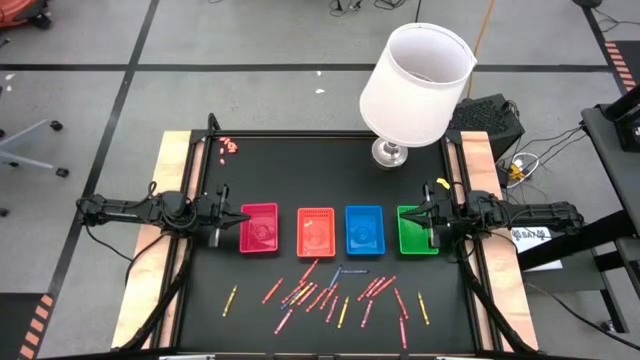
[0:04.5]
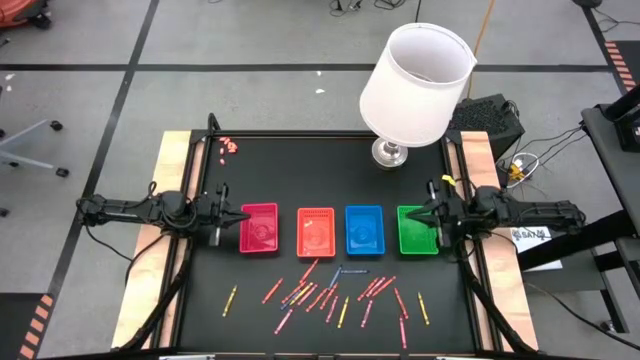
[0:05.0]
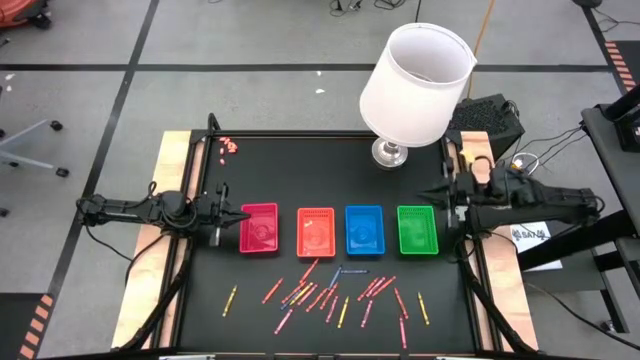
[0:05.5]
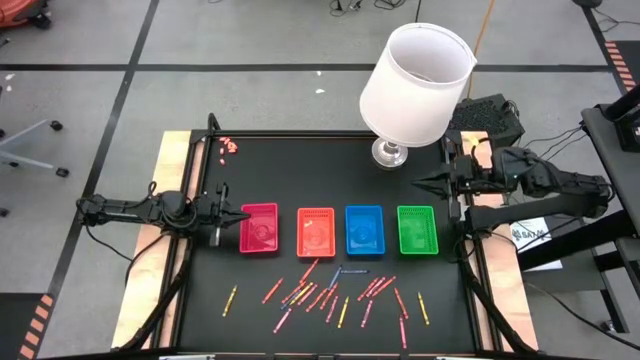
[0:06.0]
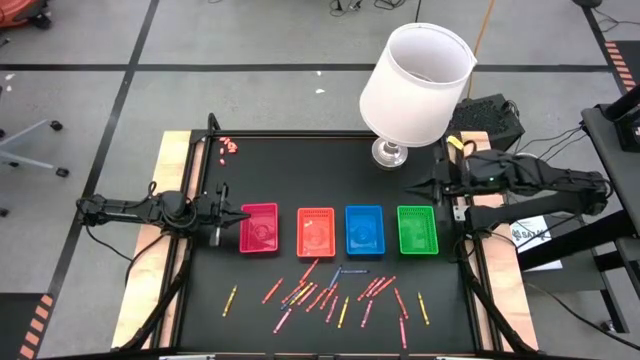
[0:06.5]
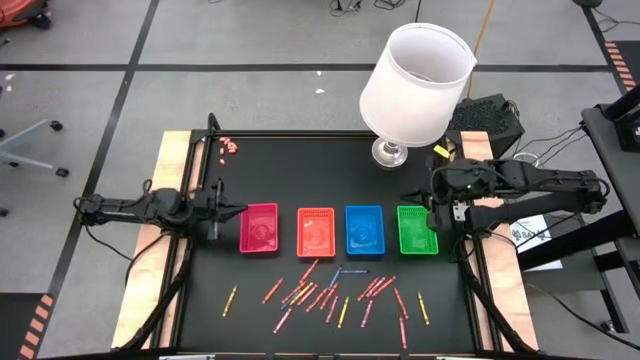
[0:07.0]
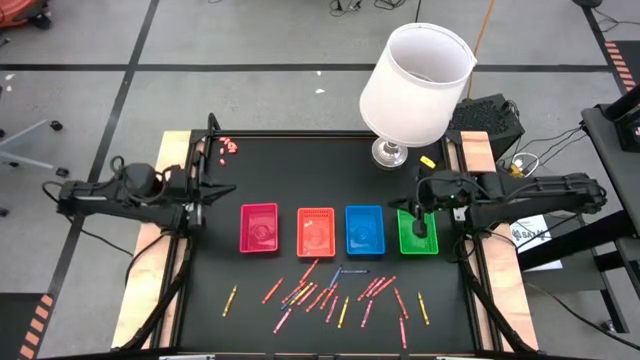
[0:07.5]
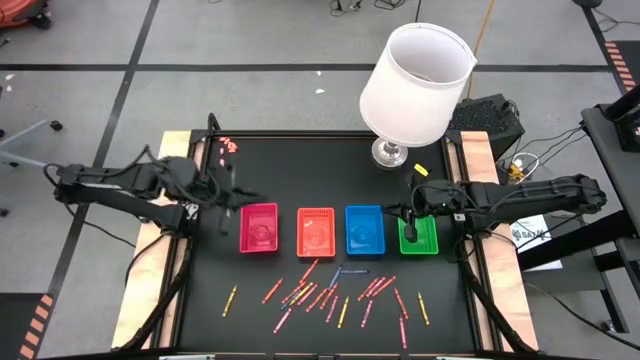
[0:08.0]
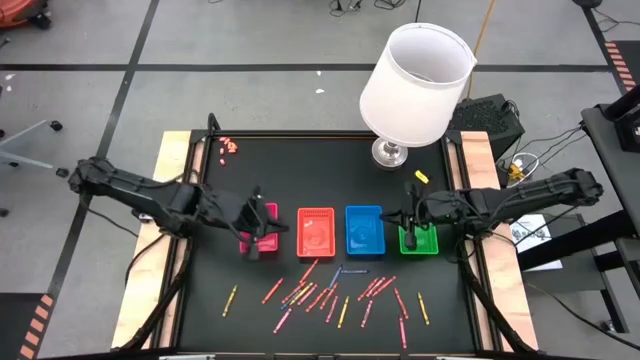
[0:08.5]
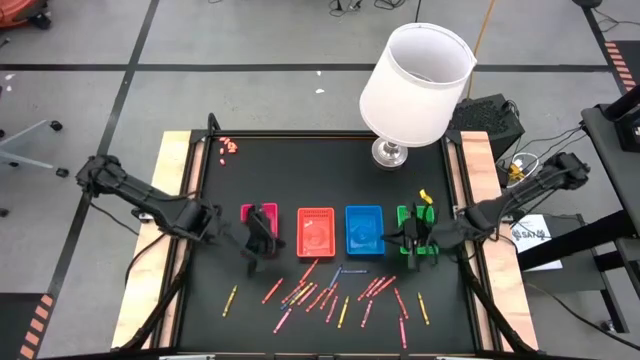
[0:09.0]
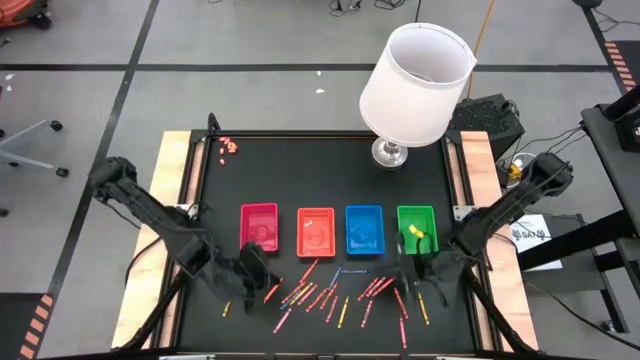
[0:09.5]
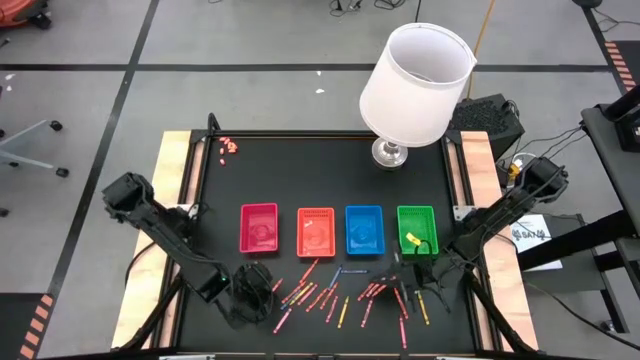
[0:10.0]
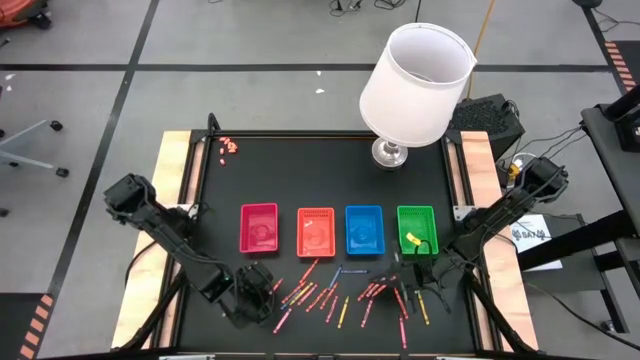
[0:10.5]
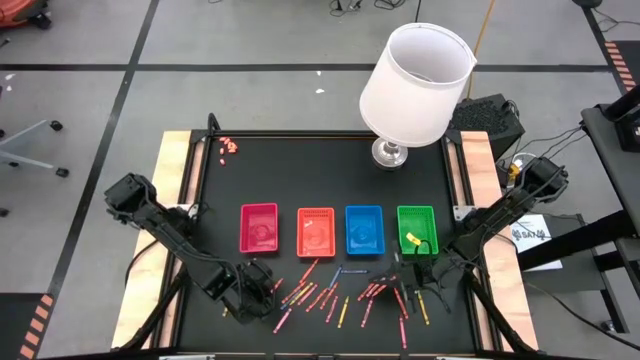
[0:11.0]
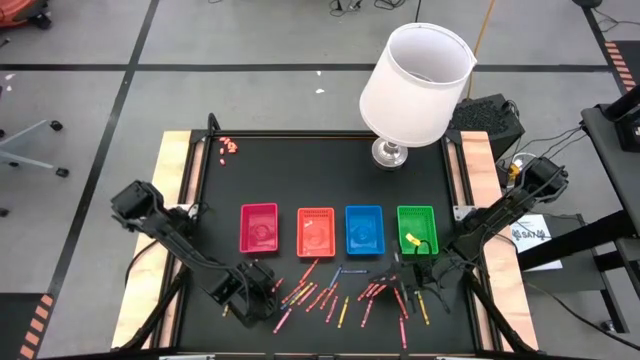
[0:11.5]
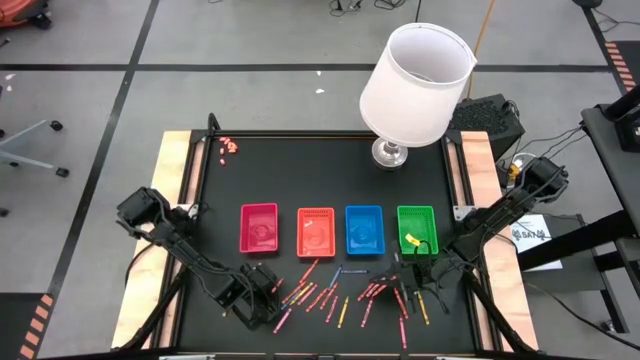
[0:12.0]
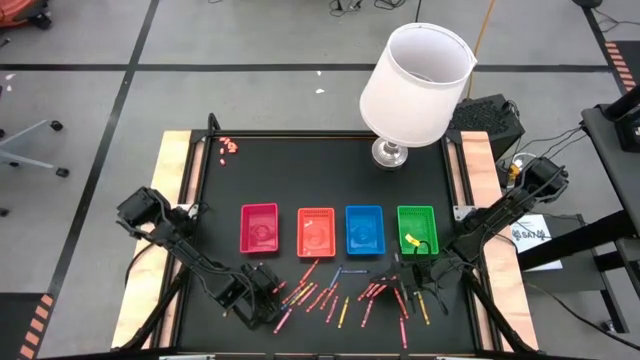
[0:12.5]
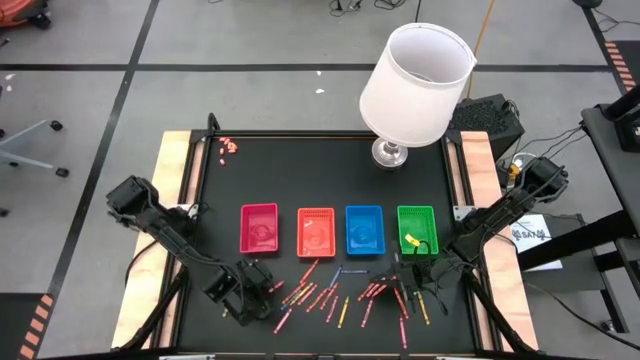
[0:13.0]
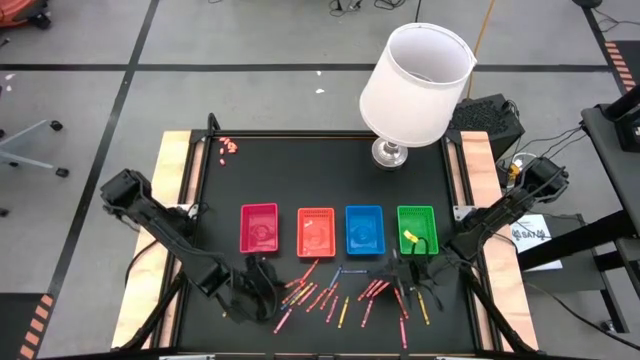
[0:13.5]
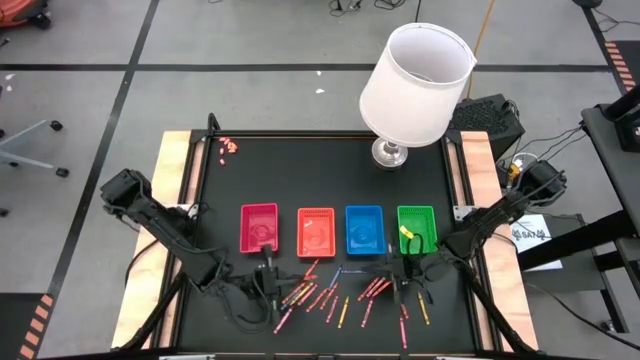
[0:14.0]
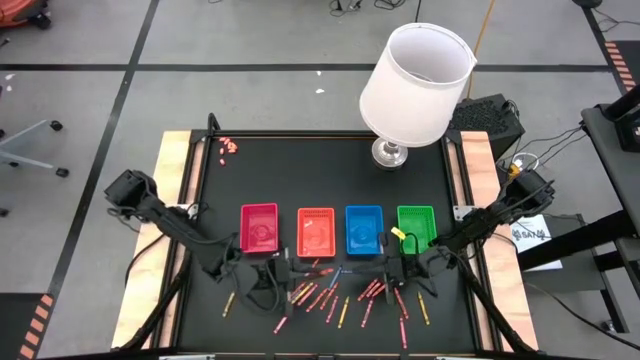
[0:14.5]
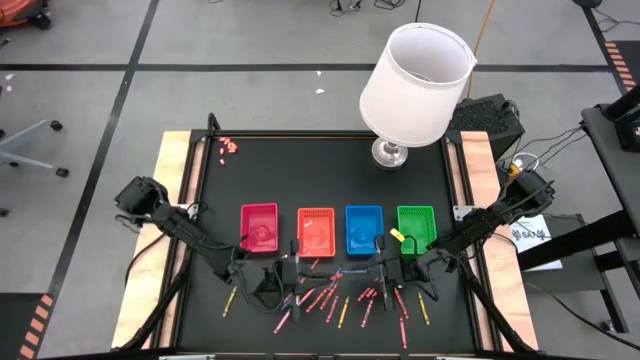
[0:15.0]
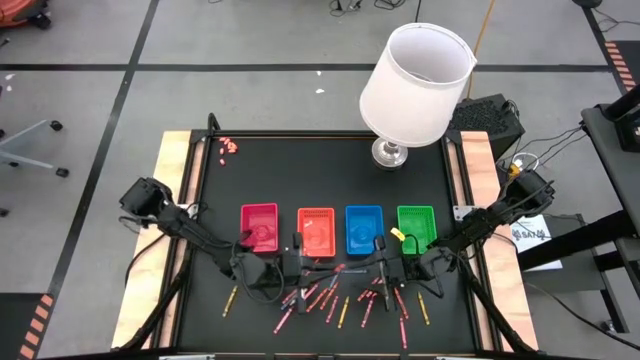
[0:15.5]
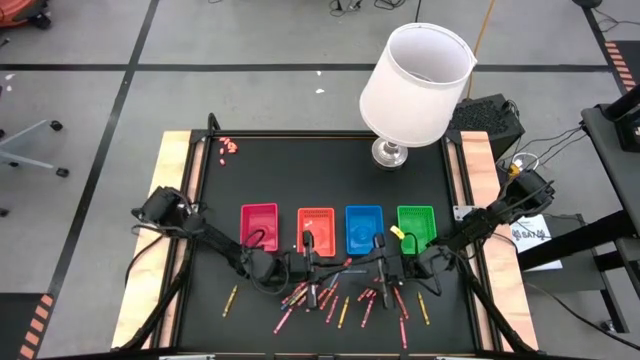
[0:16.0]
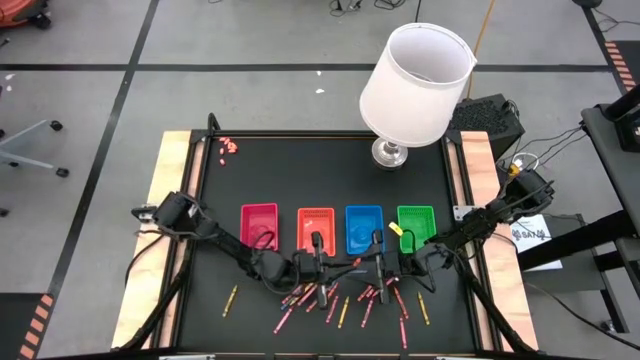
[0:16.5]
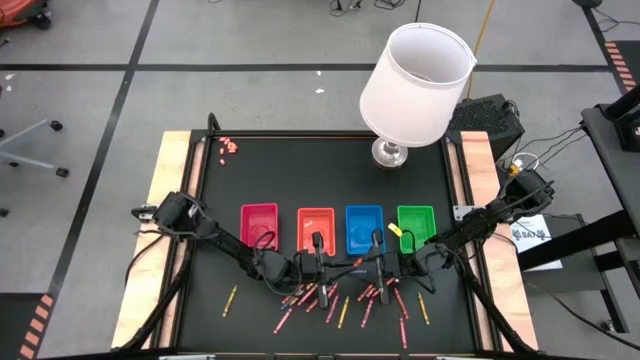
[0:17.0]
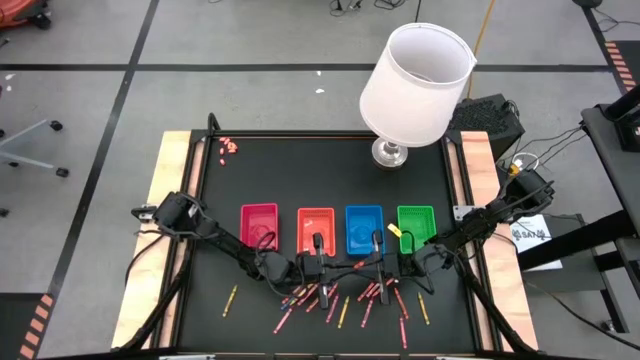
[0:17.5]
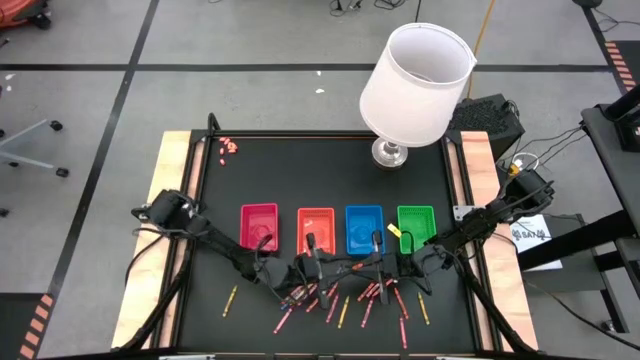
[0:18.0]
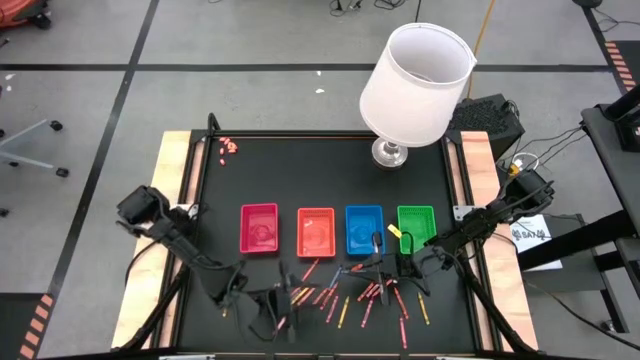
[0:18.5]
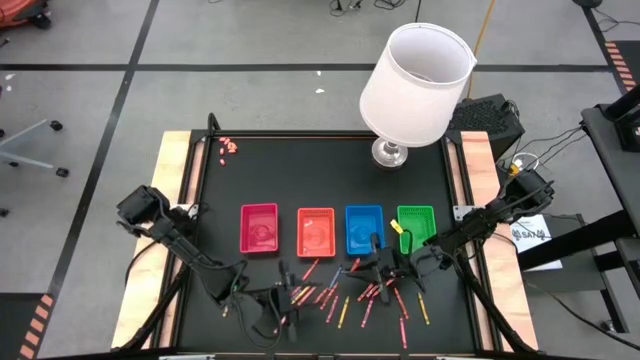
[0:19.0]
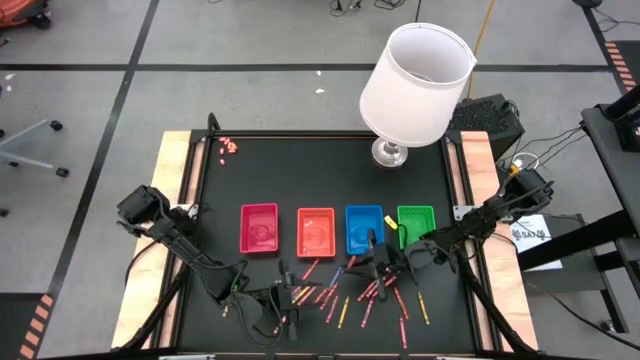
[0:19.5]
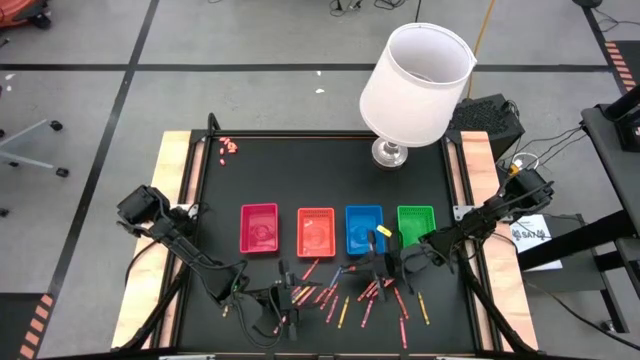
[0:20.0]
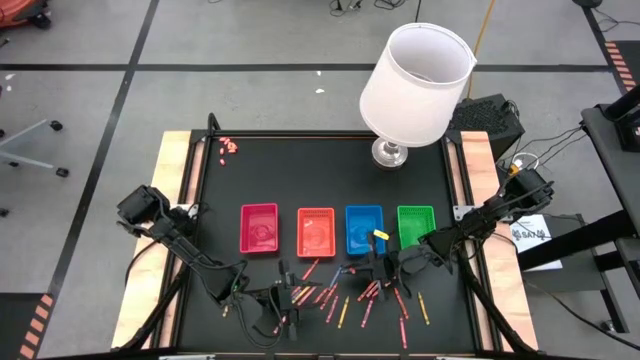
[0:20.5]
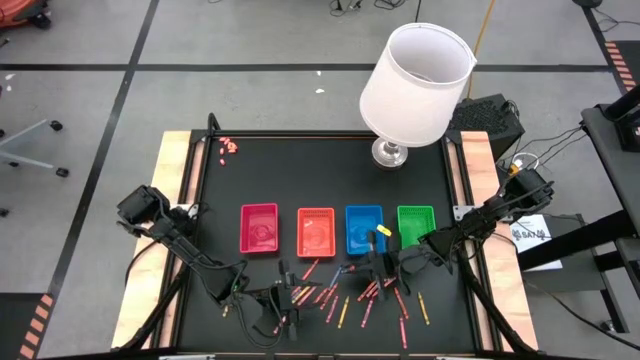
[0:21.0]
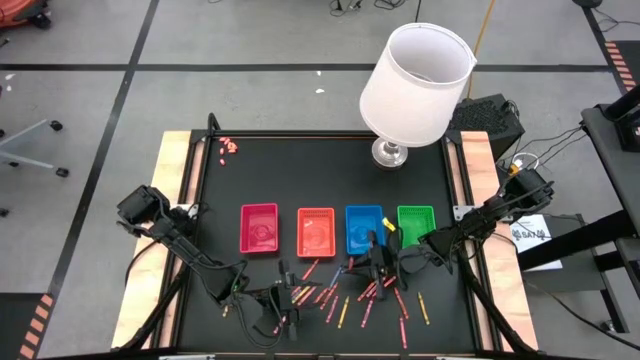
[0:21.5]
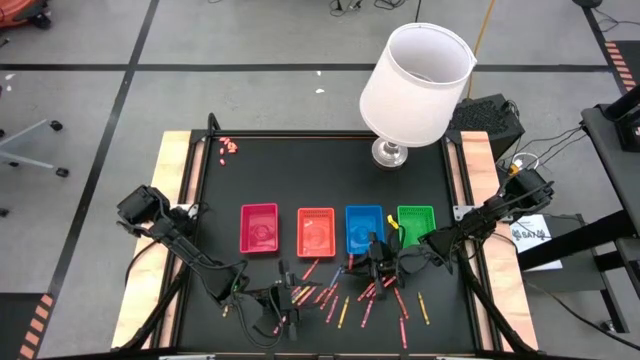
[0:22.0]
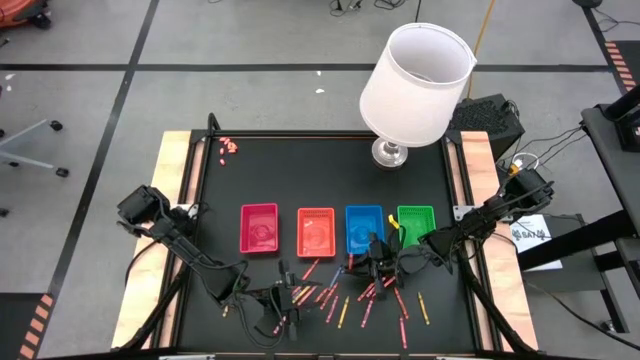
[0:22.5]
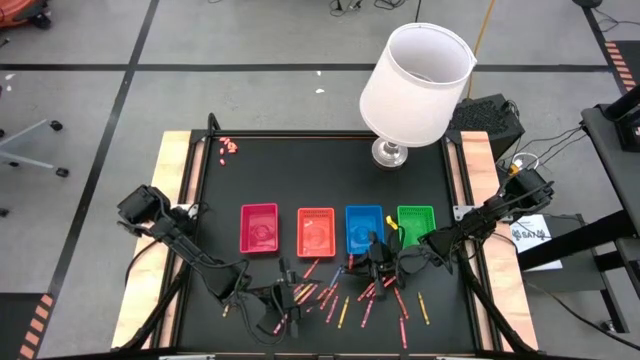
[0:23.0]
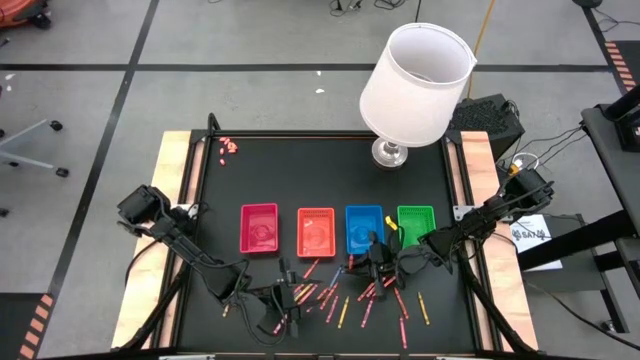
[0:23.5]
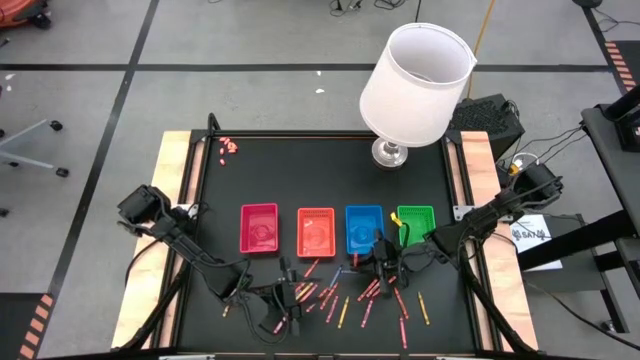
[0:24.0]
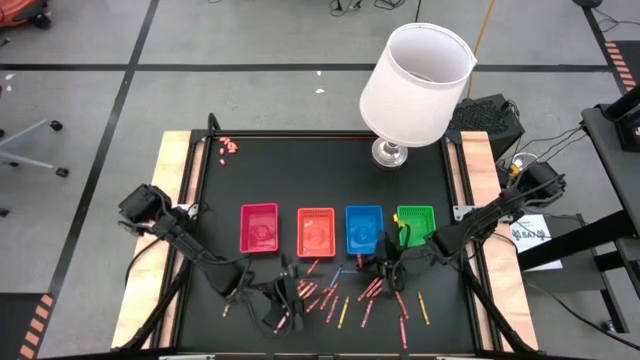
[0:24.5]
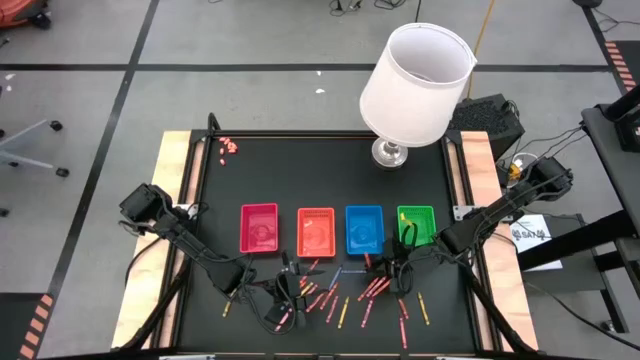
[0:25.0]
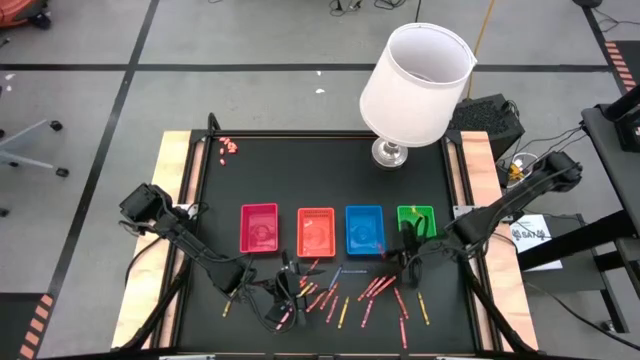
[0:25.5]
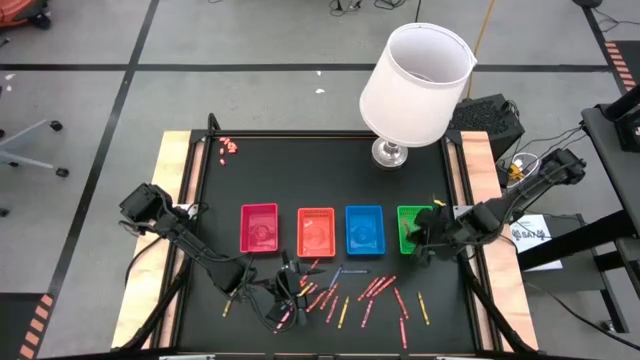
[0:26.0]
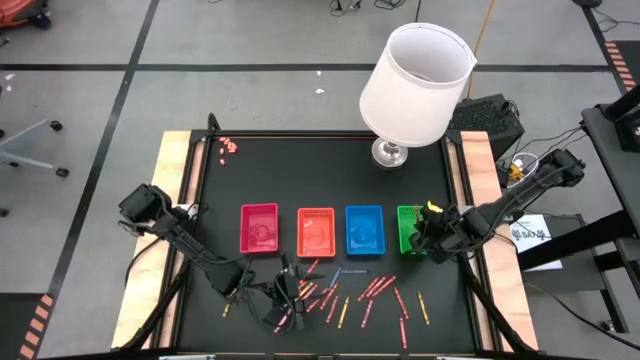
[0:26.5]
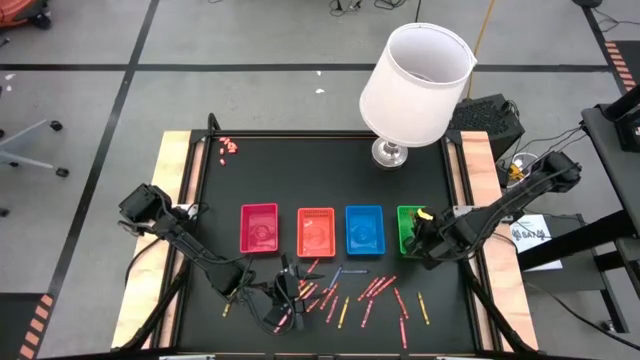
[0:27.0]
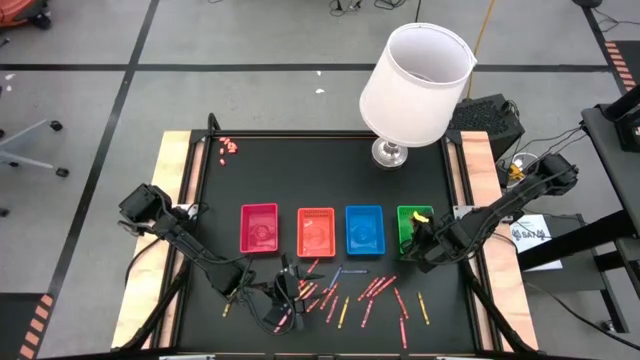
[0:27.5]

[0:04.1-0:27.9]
Task: Sort crayons
Put the orange crayon into the green bin
